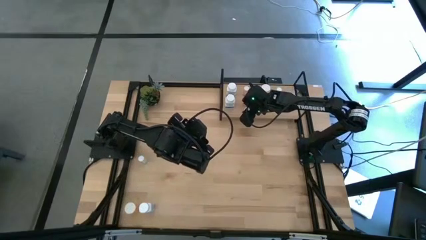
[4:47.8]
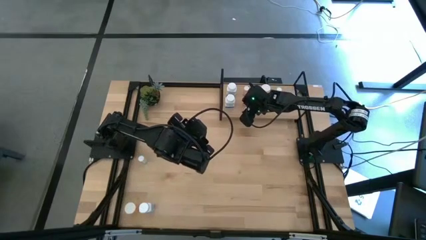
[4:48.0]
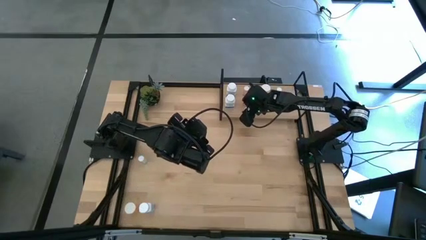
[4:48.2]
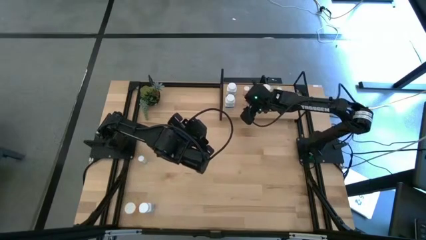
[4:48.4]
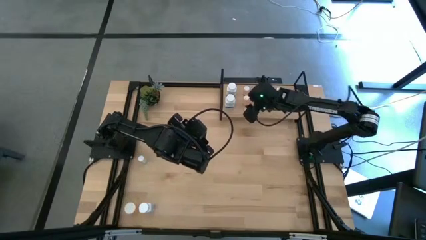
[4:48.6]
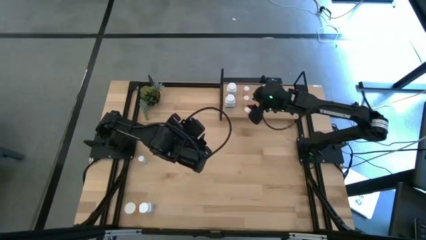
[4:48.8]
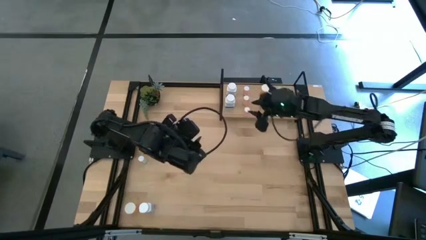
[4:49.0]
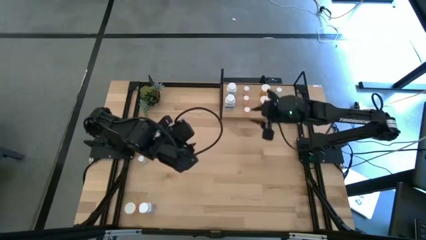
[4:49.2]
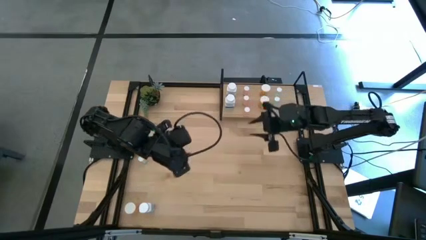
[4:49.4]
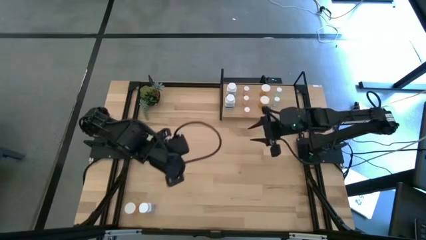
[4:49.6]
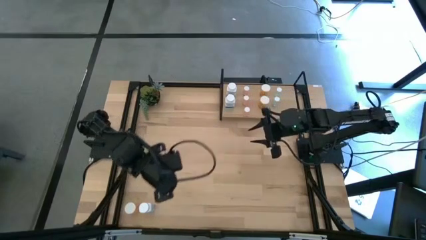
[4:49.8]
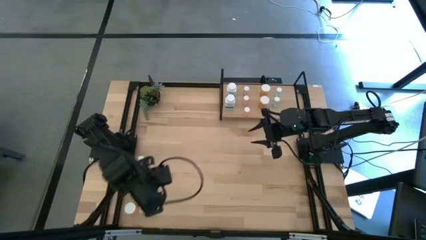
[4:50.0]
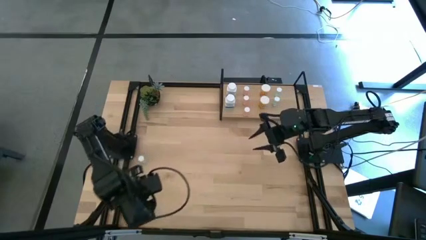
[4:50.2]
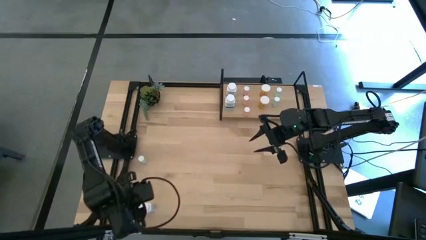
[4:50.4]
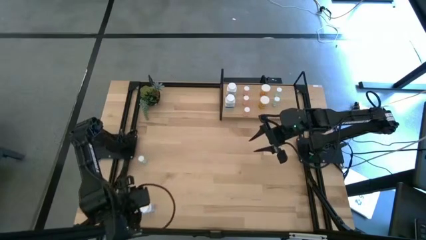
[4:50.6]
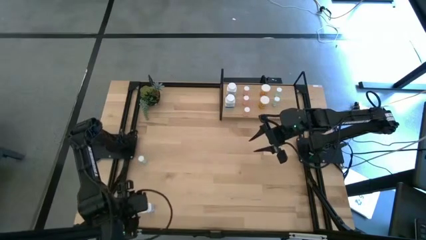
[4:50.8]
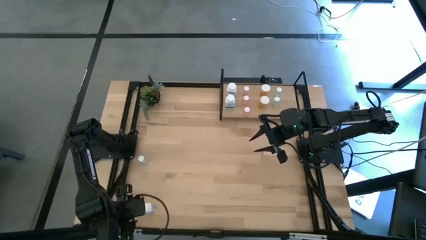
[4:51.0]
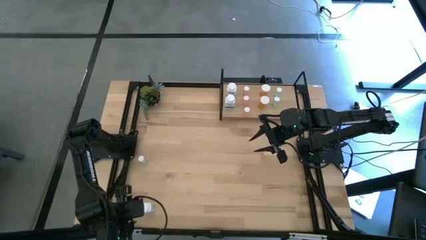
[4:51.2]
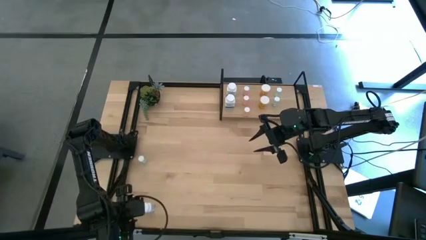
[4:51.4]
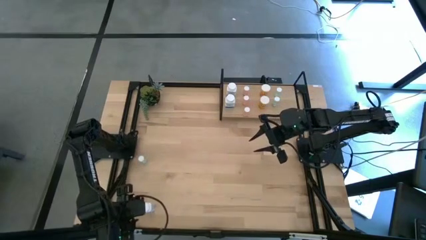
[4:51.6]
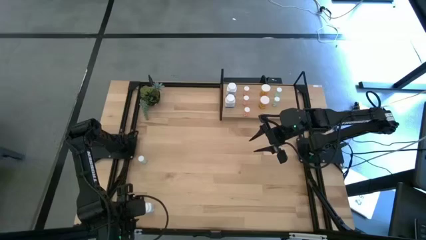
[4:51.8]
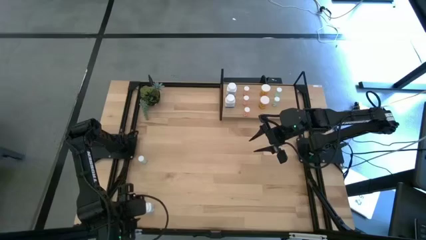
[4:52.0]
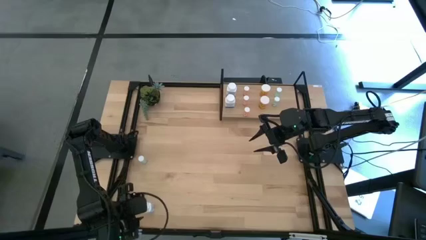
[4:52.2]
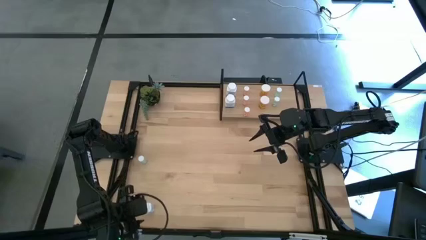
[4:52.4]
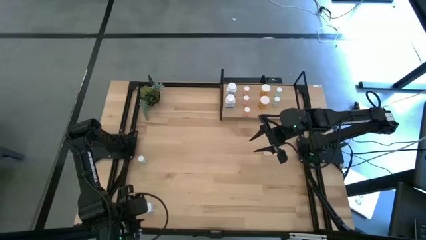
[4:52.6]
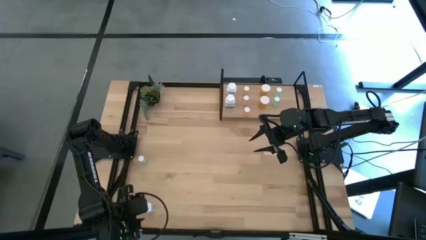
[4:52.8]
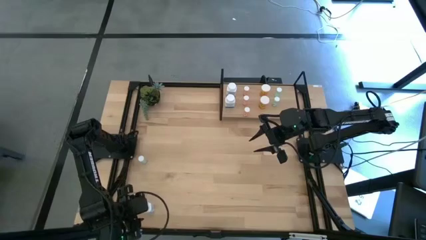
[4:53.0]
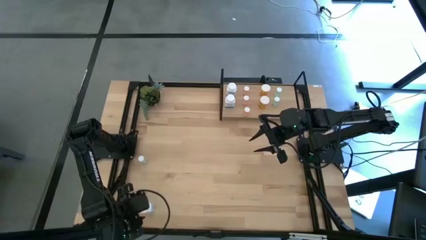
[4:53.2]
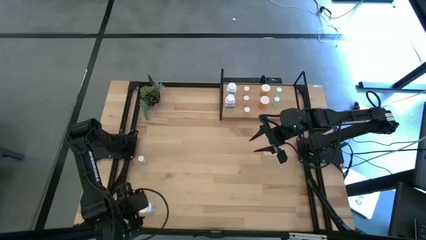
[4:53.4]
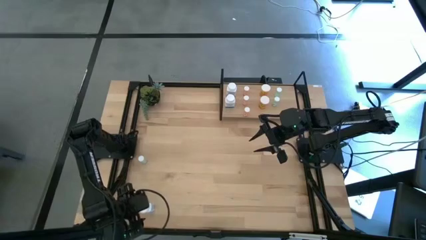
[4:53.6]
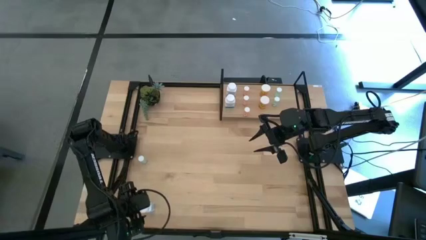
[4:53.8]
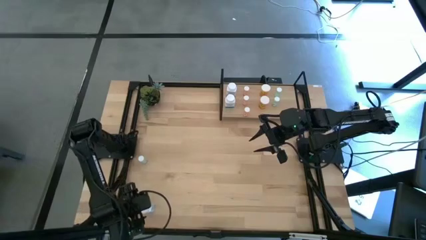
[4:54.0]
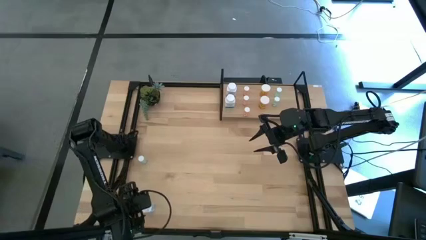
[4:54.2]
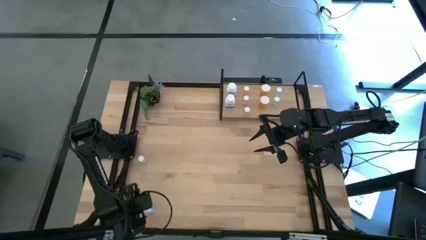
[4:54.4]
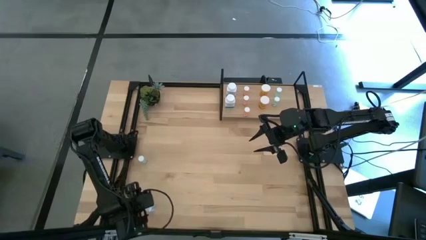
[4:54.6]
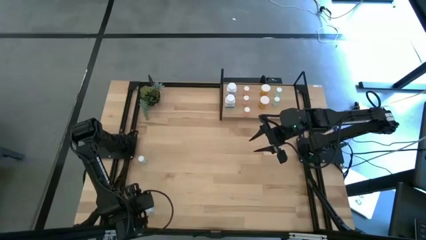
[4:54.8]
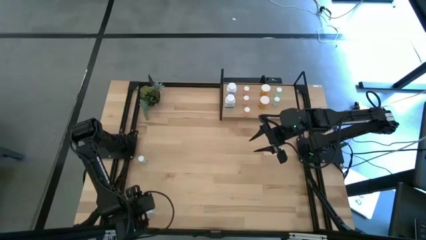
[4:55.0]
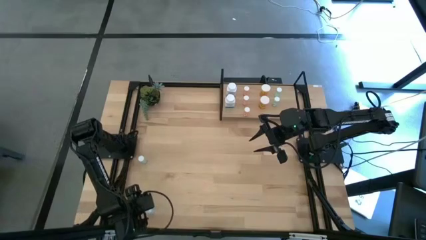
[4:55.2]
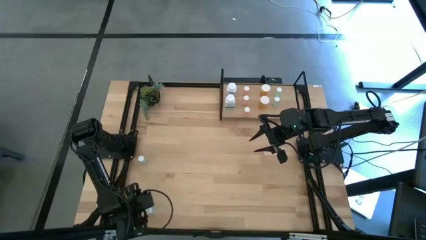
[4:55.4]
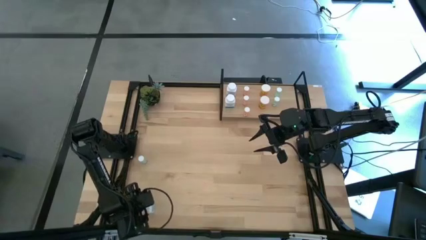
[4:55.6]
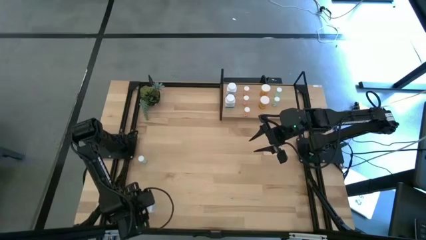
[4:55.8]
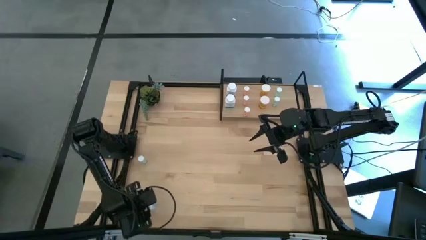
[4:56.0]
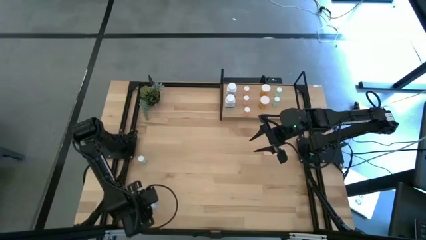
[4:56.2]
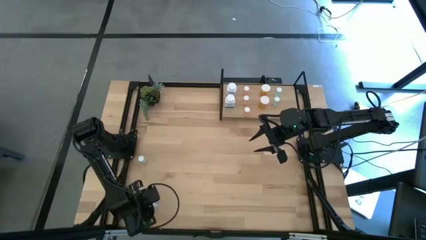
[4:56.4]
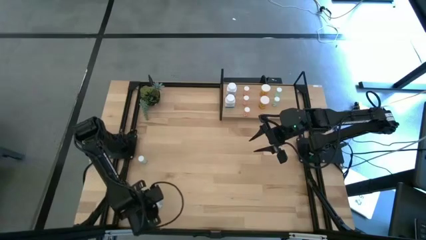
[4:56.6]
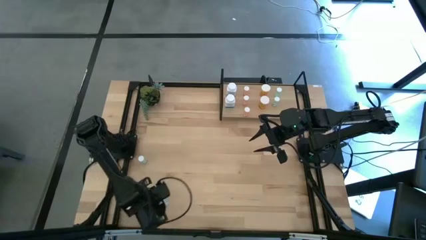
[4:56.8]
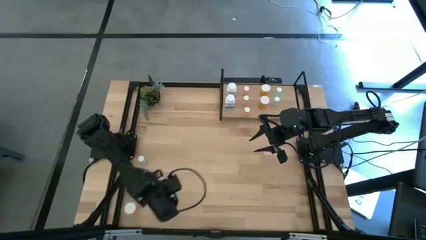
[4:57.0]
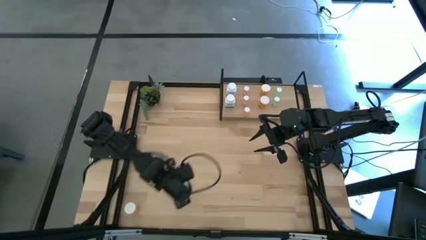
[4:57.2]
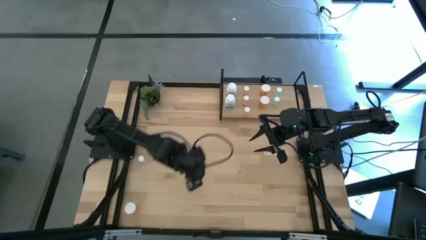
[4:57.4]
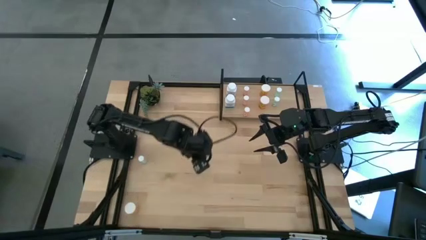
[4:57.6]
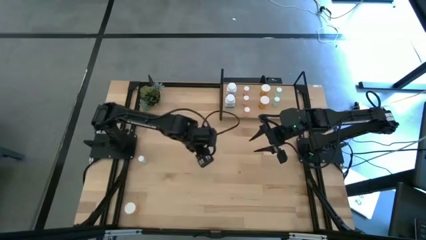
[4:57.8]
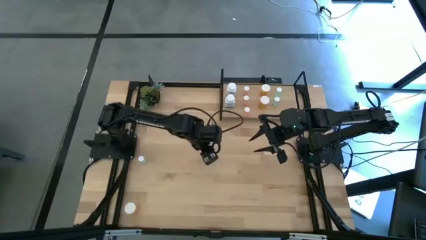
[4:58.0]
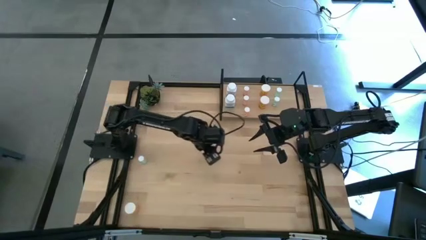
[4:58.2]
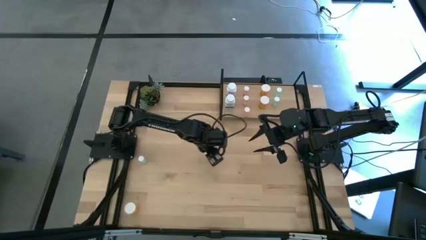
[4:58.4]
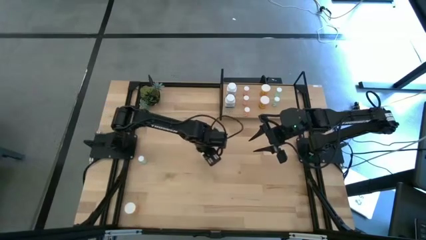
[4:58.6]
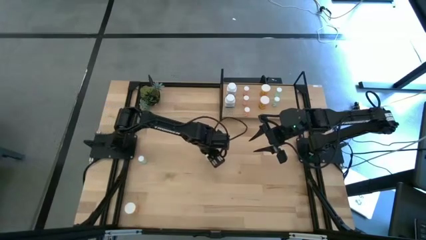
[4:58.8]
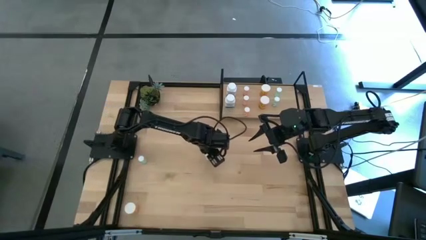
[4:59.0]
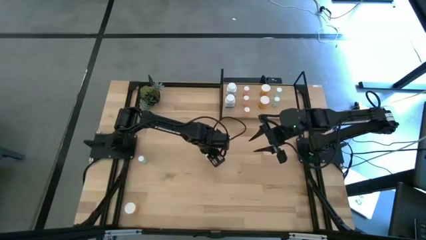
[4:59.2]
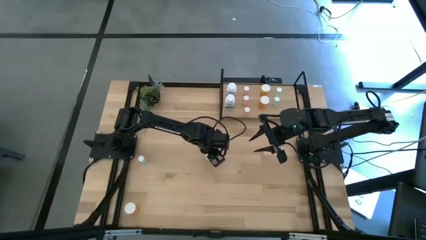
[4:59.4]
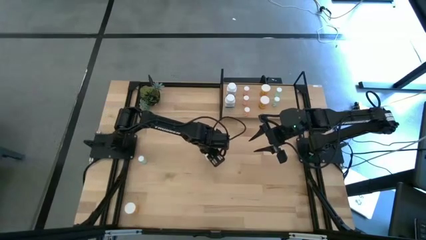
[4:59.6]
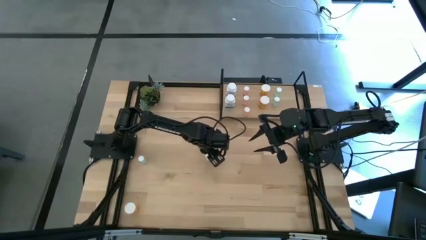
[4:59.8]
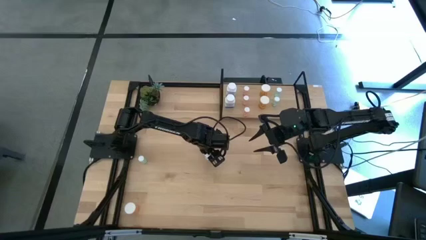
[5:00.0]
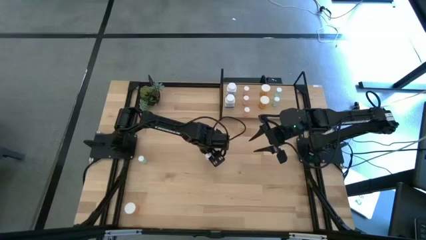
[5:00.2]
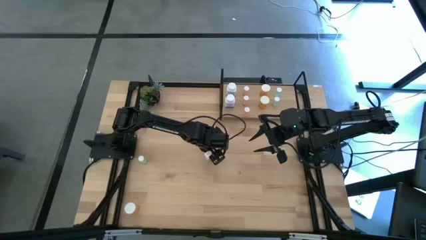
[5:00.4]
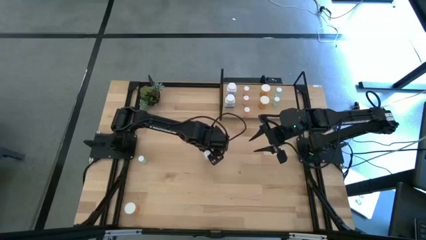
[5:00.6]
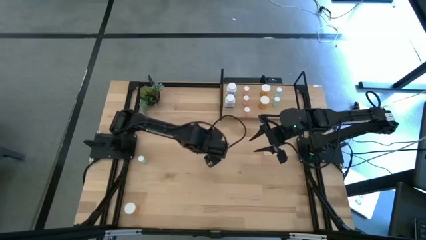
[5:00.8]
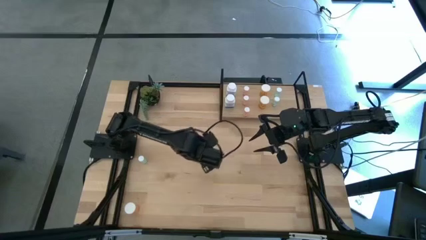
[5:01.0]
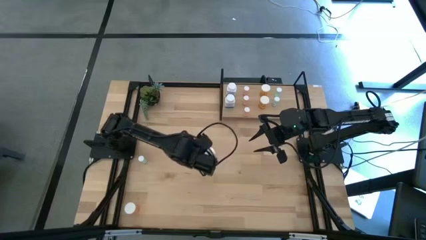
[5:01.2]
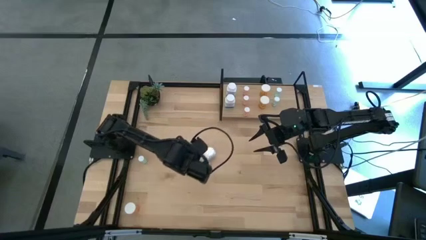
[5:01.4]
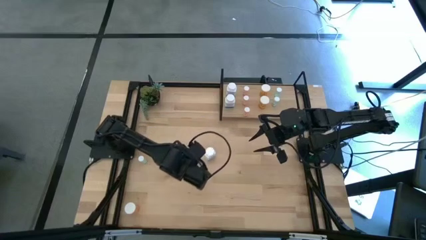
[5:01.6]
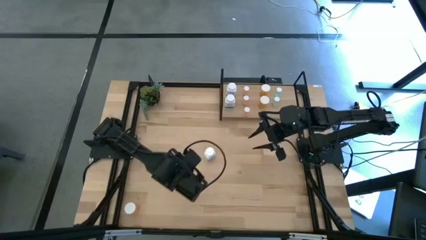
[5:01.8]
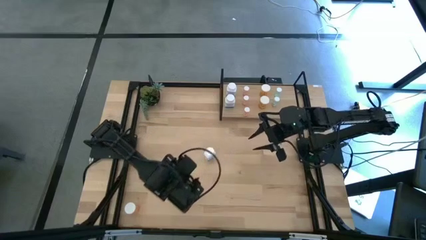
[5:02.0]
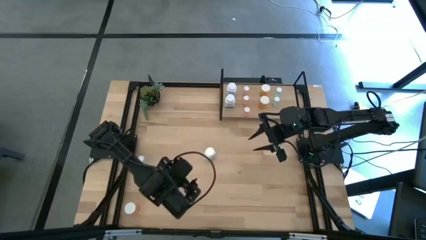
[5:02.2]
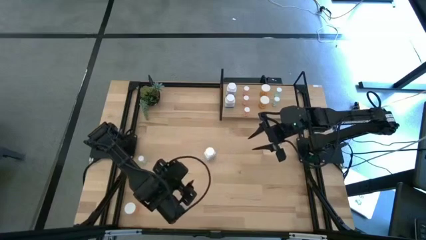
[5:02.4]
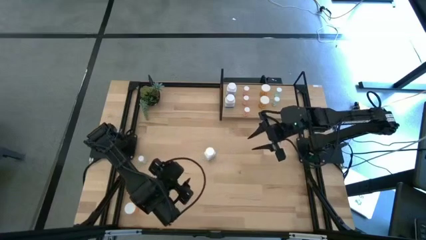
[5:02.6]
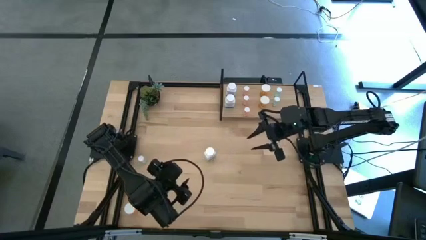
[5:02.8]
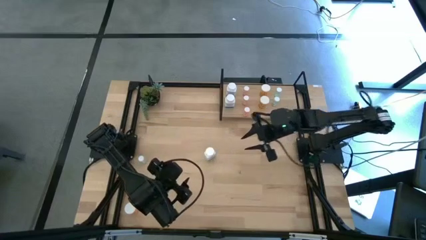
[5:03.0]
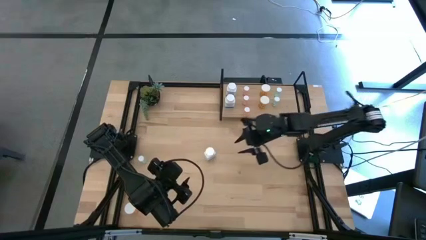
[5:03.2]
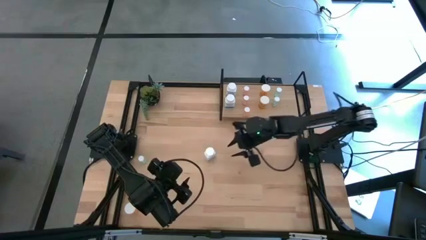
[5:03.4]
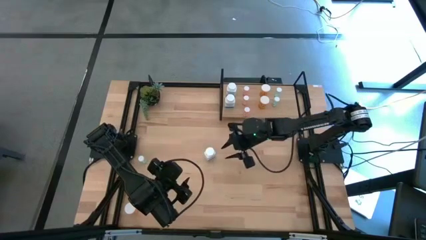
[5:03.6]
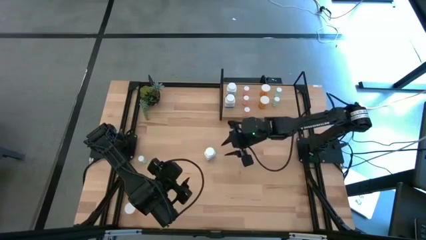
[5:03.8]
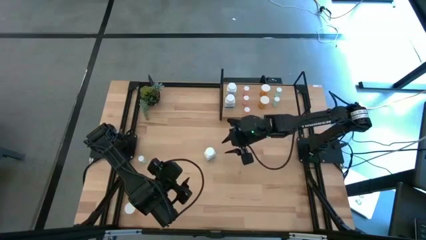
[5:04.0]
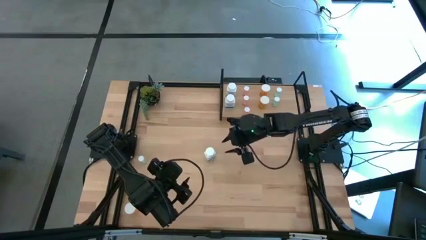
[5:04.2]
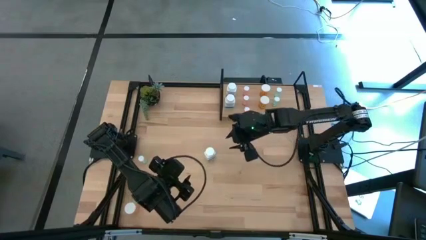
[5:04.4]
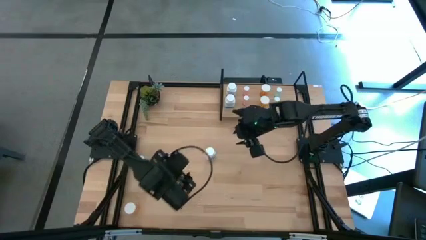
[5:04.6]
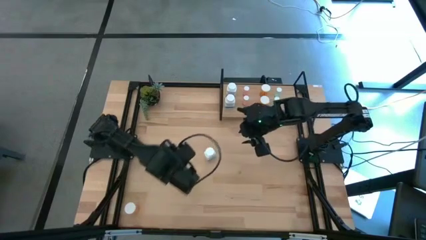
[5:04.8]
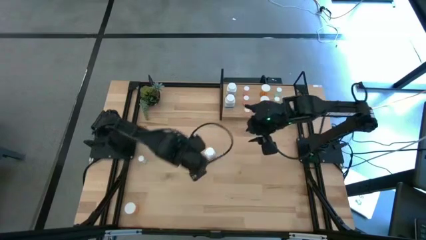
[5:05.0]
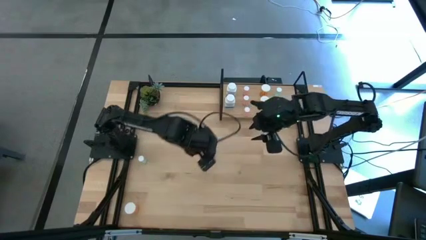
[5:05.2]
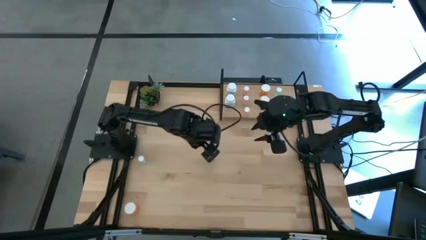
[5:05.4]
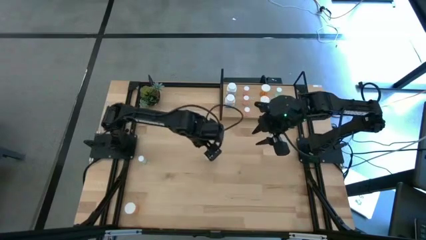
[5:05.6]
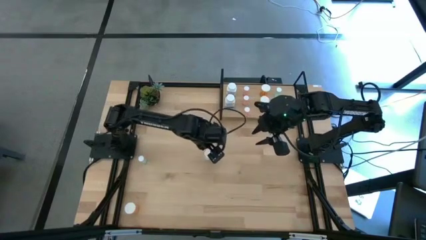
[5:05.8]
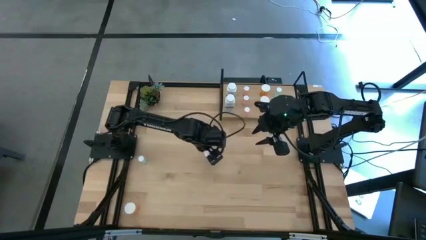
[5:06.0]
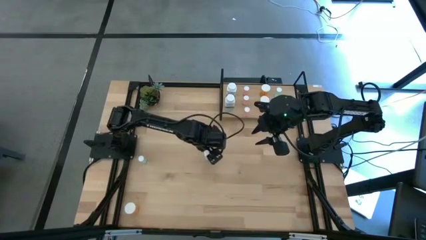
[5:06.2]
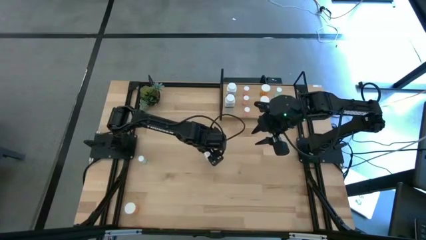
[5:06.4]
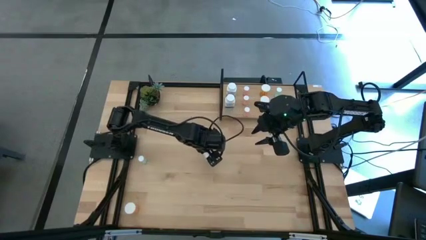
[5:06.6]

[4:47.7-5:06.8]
Task: Pick and place medicine bottles onto shelf by color
Put the white pill bottle on the shelf aligned with the other white pill bottles
